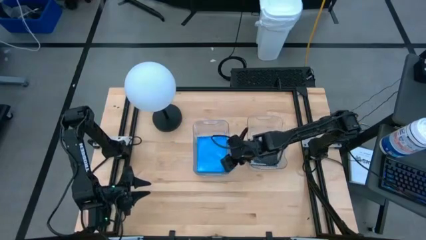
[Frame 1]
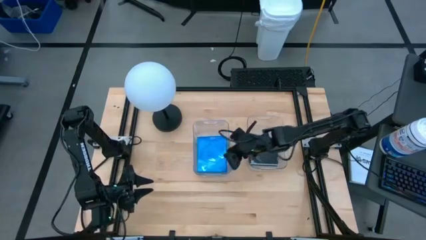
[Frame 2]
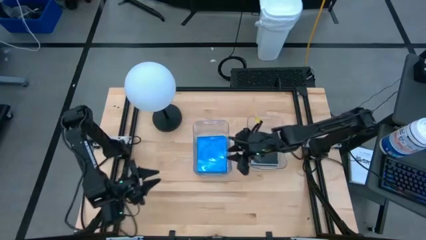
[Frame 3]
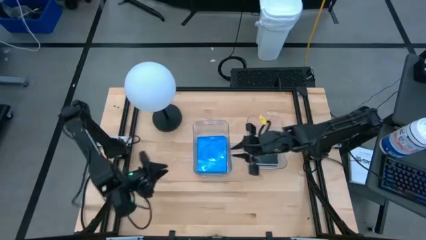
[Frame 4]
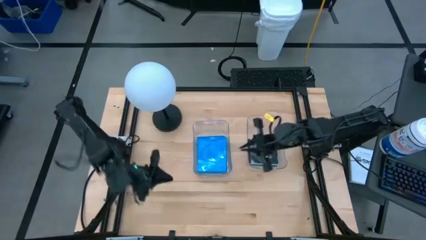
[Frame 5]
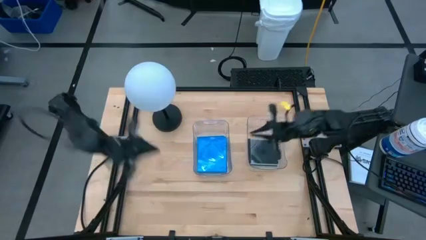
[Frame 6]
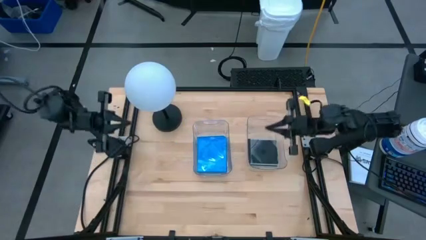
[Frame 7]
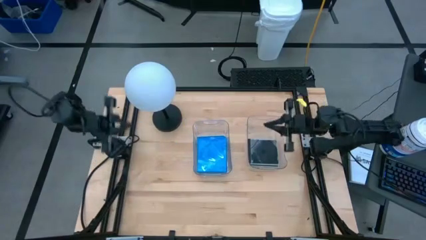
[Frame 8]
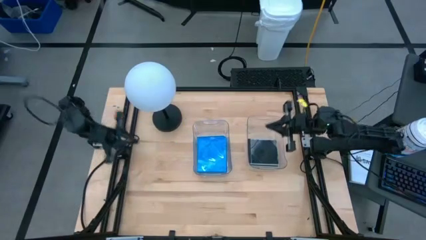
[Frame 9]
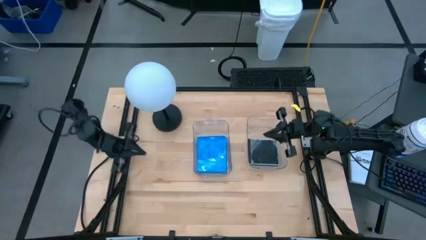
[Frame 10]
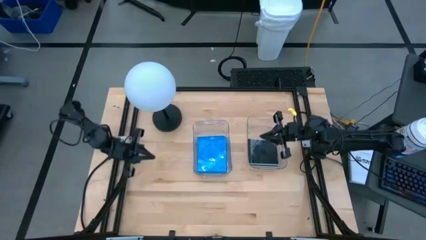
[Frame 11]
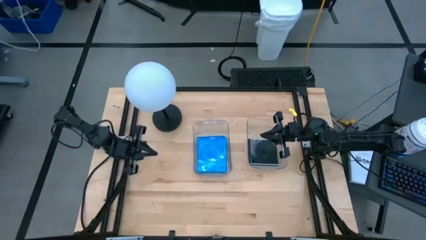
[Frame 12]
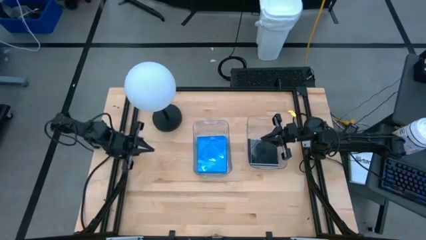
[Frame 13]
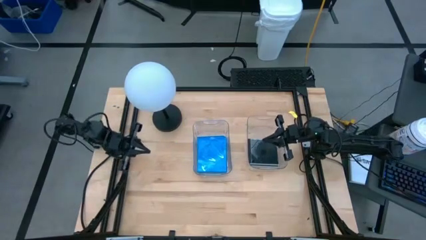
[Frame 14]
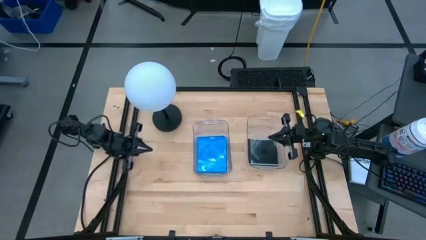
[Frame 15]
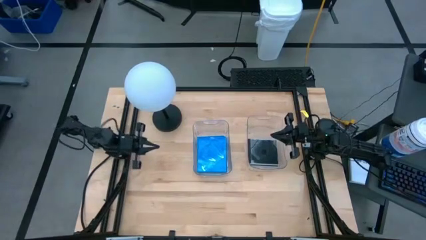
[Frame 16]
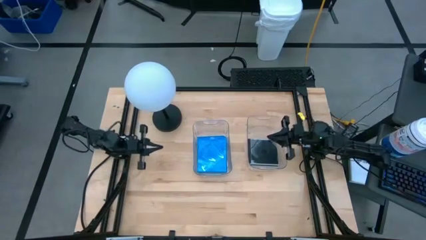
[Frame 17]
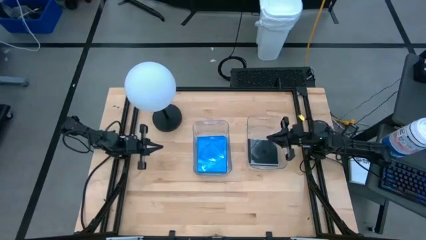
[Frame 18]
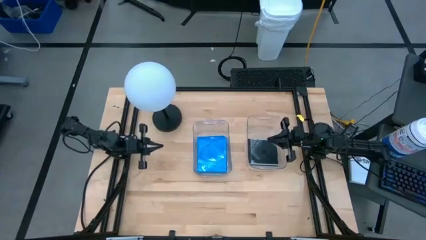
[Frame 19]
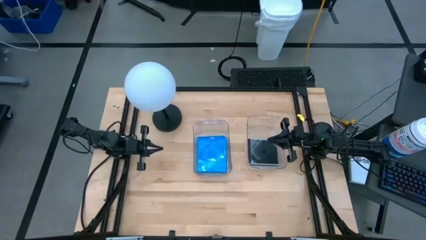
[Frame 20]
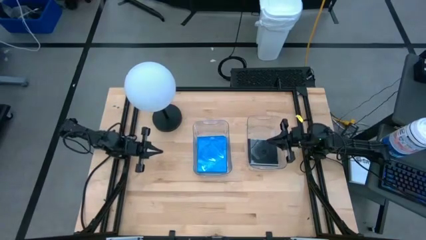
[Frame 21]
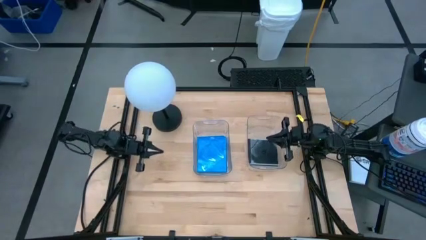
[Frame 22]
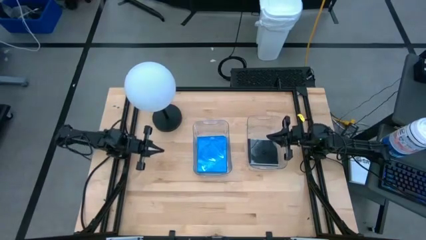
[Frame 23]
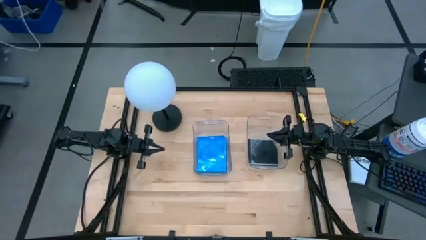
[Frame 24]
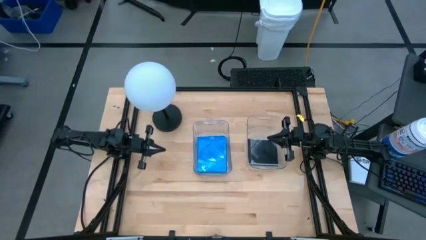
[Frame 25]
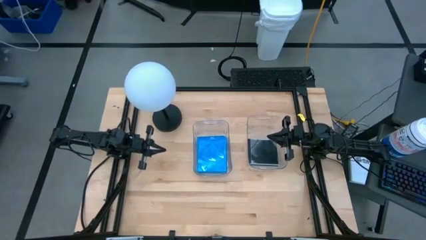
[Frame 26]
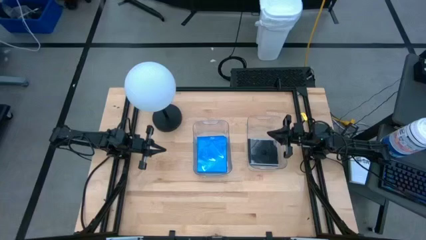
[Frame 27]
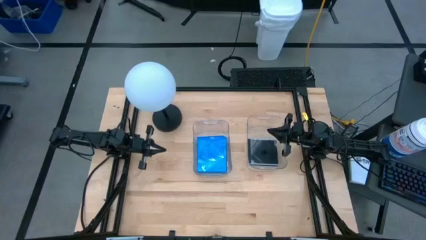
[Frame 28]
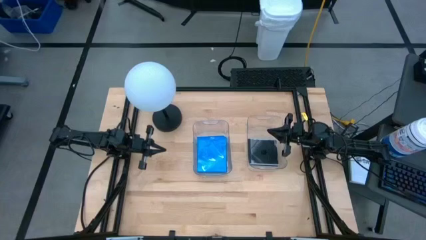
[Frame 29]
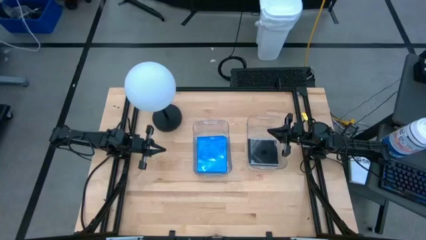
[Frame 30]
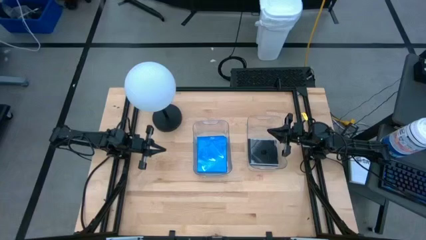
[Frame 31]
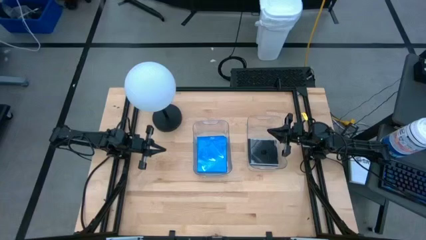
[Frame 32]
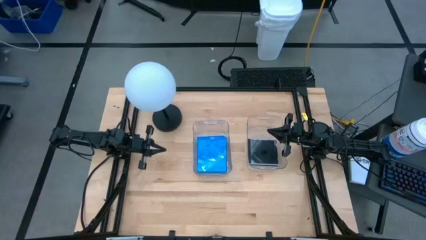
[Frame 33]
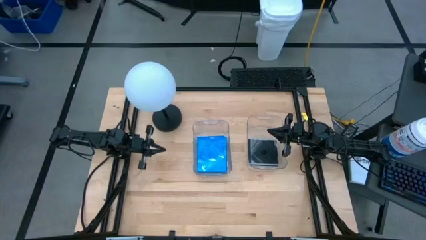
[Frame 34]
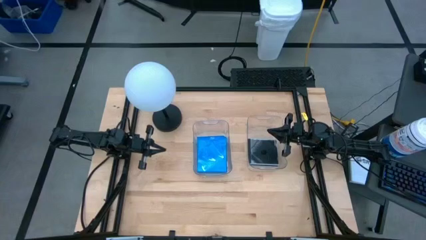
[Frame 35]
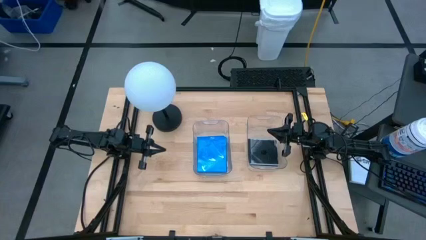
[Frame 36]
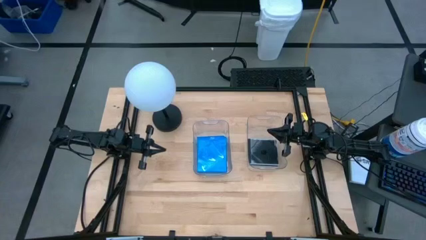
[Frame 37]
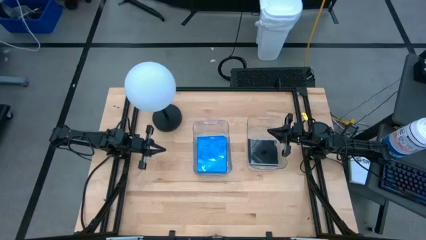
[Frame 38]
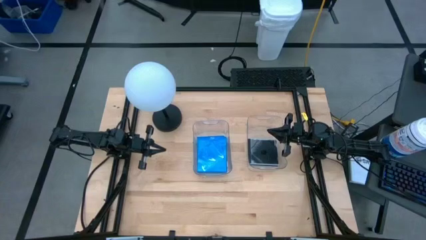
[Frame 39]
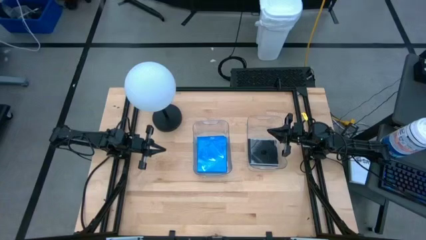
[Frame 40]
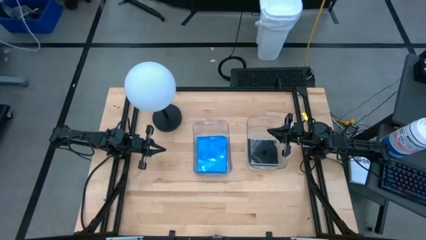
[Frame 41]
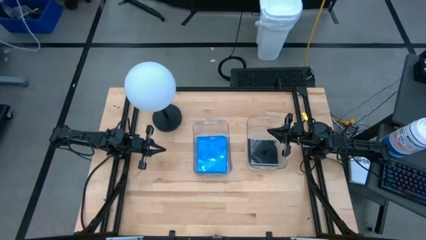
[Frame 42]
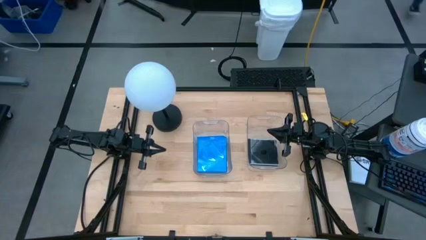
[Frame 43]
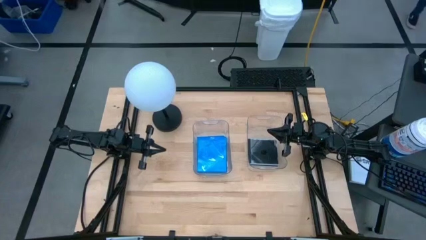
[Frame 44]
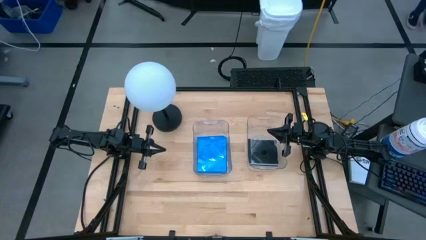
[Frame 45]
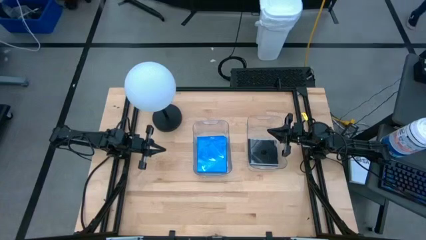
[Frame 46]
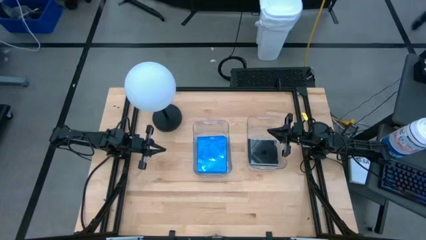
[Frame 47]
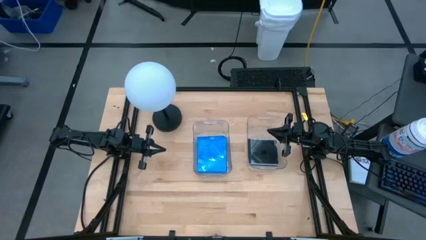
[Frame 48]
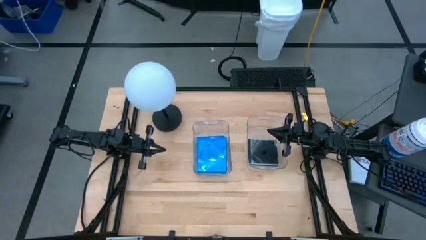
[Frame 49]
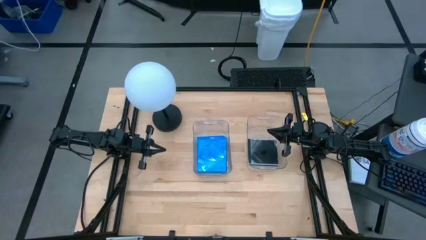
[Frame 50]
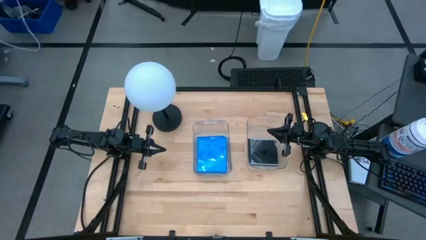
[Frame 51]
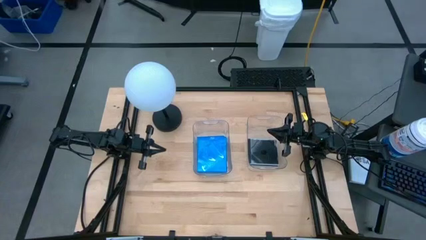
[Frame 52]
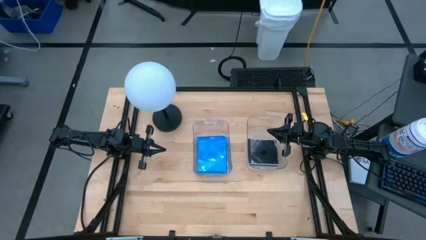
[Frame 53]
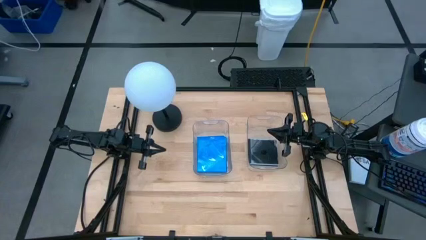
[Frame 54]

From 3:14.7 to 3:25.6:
Task: Pick & place jewel cases by type
Return to Home Position

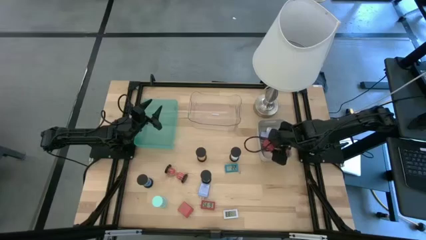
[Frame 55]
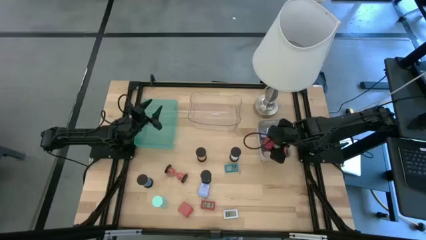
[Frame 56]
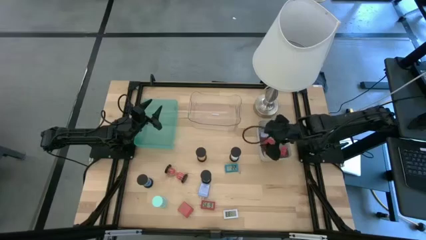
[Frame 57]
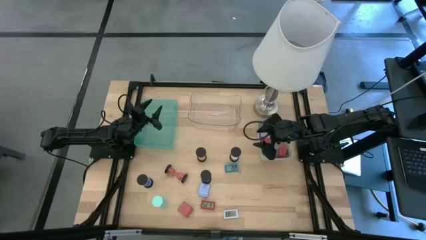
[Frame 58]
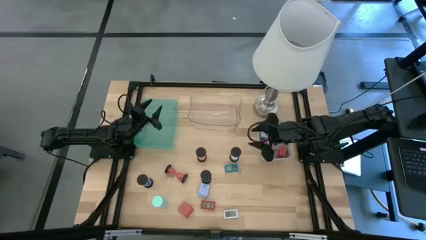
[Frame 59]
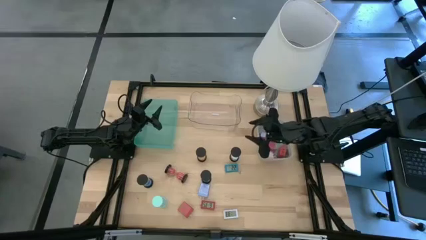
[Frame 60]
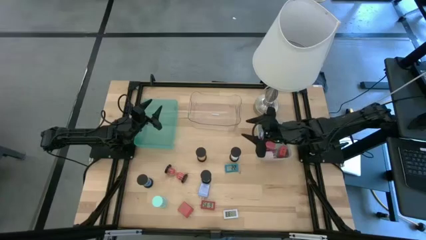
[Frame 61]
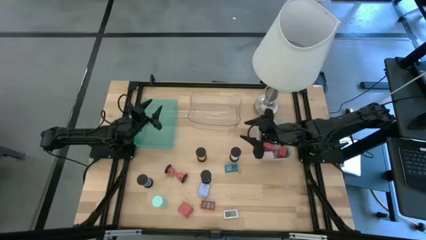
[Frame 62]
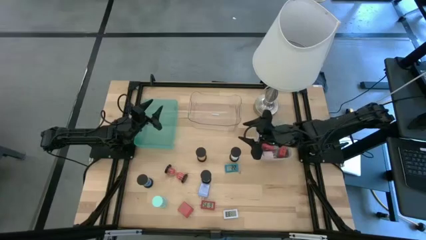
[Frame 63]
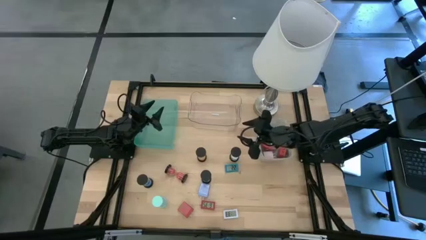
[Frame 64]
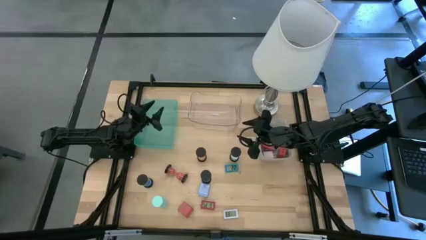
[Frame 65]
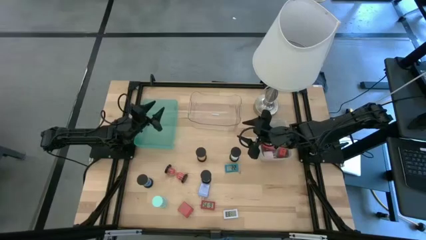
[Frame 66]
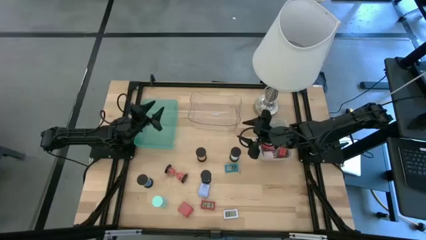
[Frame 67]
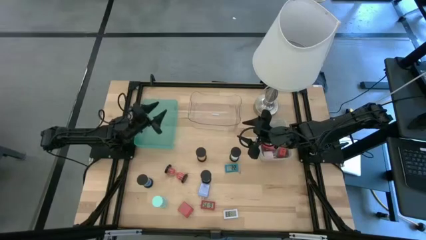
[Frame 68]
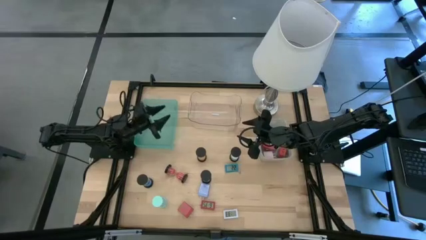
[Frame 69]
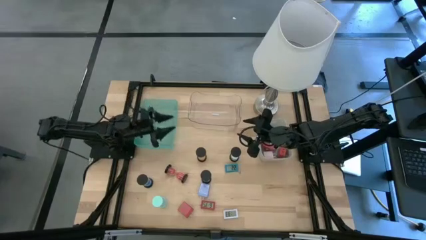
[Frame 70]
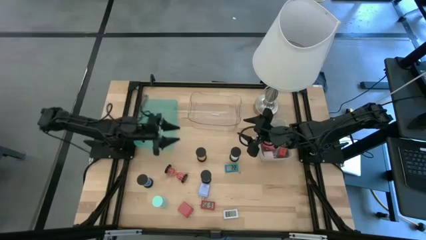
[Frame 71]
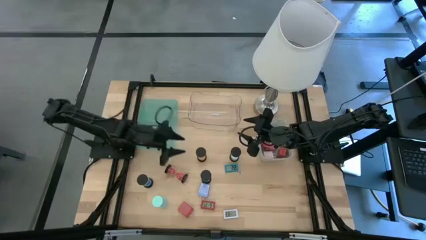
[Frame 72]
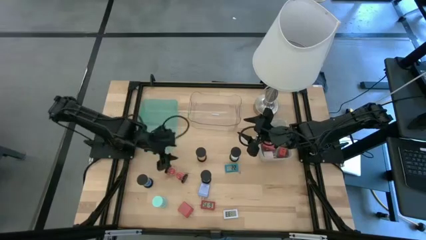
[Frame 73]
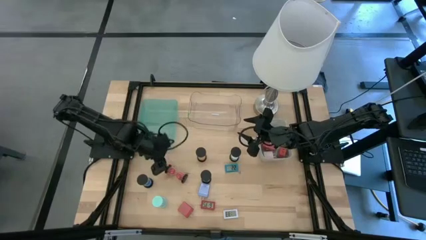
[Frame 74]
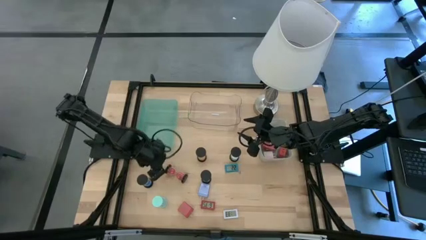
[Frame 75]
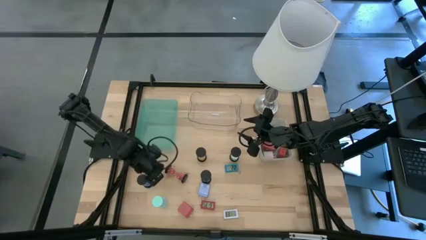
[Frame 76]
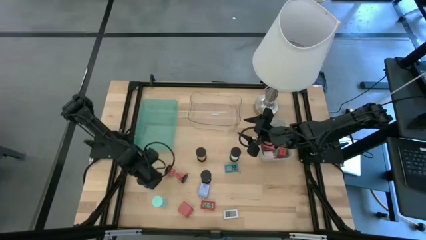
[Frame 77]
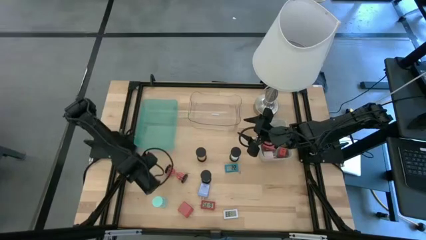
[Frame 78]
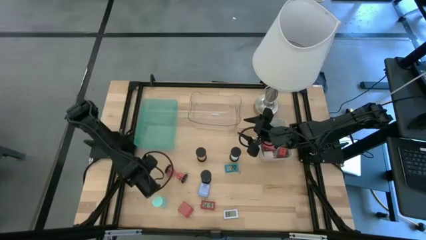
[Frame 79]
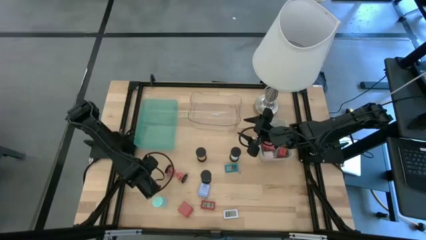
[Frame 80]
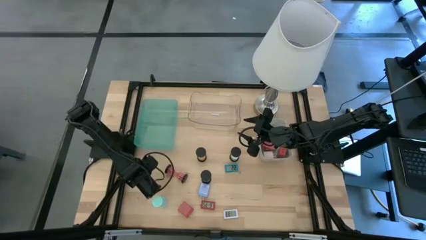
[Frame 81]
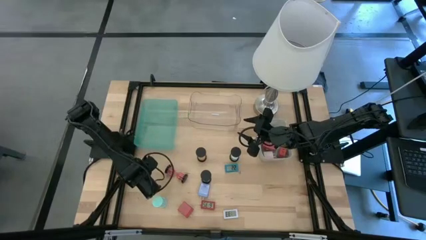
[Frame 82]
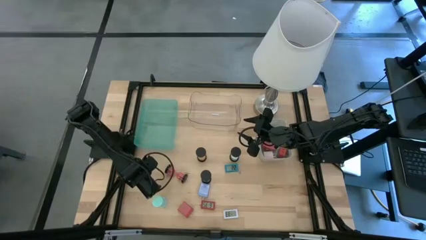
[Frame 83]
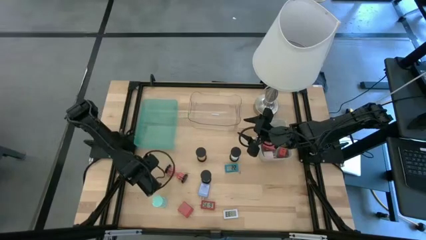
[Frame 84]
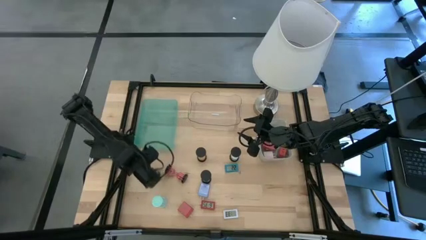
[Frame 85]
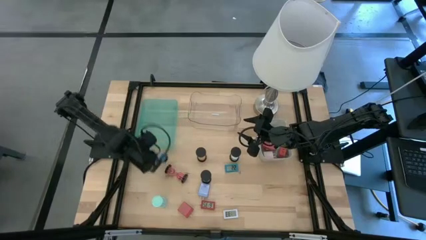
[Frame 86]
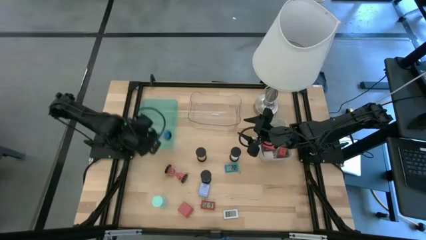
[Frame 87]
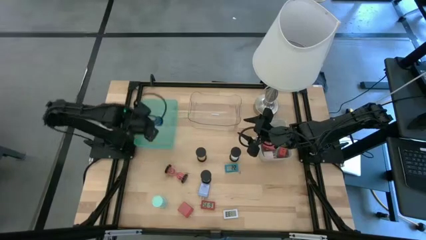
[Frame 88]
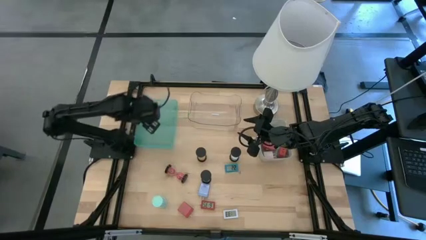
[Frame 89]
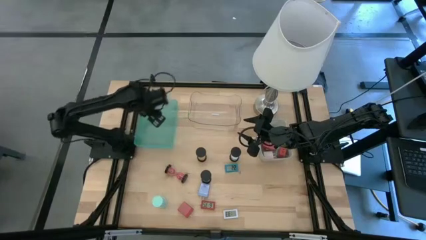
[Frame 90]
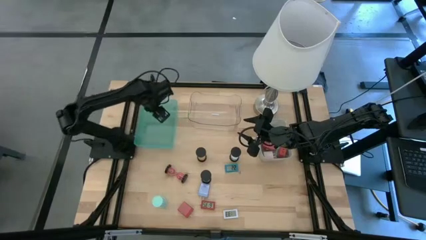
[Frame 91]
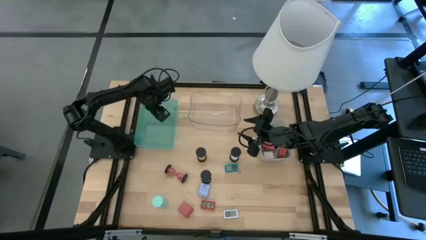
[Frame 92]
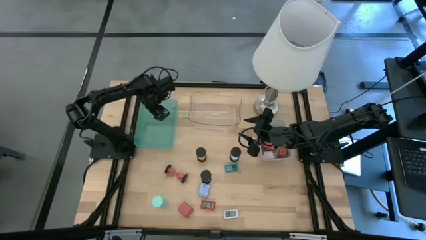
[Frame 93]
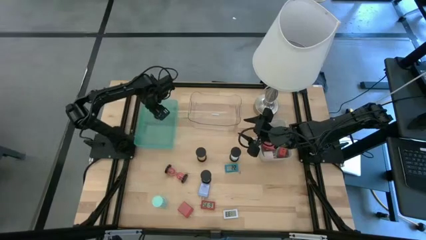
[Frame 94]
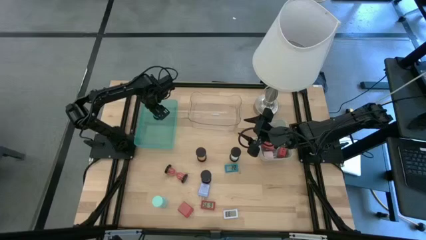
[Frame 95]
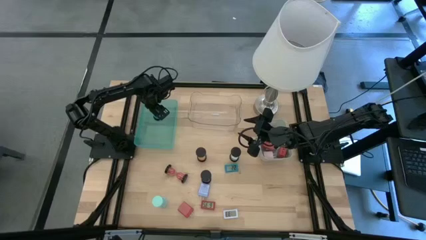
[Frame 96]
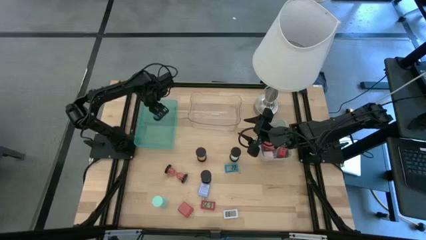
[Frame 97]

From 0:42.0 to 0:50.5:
Task: Pick & Place Office items
Put the left black hourglass with the blue sand into the green bin
